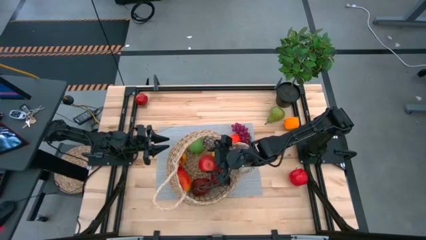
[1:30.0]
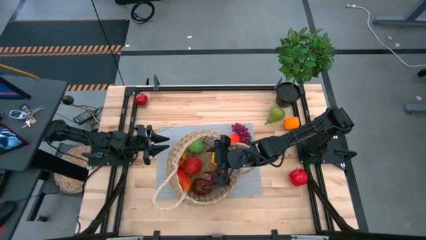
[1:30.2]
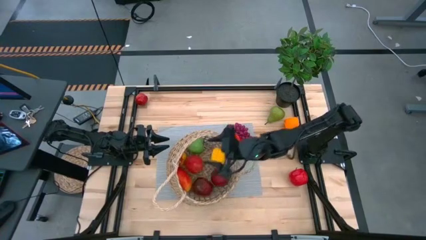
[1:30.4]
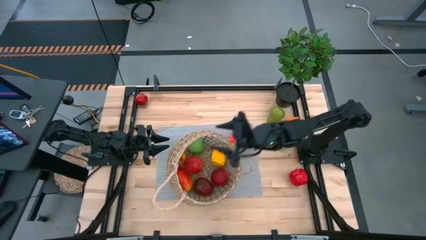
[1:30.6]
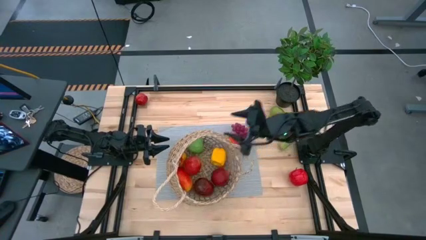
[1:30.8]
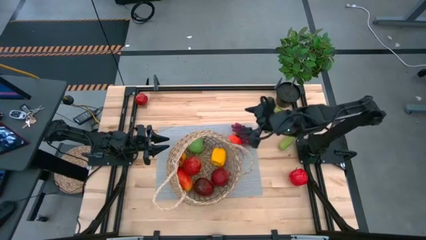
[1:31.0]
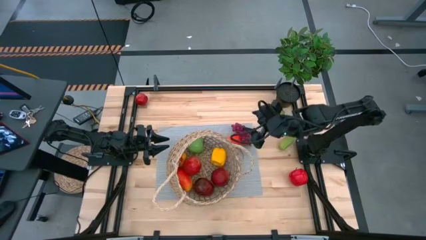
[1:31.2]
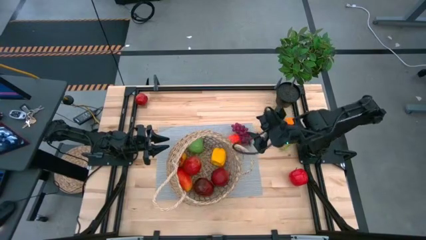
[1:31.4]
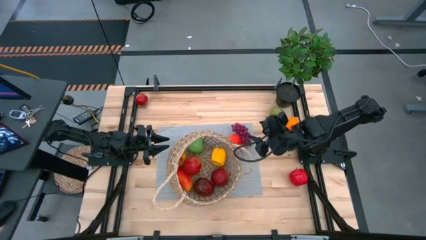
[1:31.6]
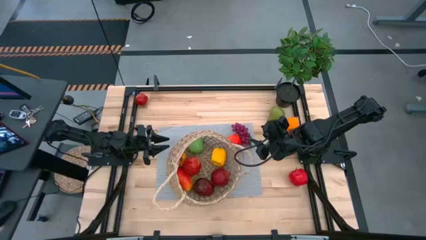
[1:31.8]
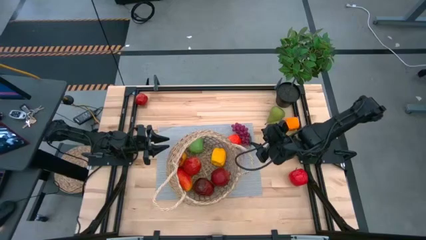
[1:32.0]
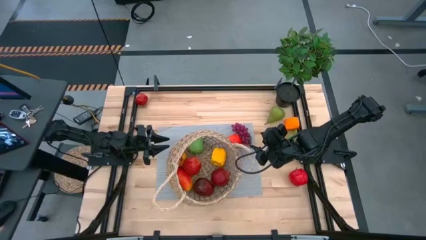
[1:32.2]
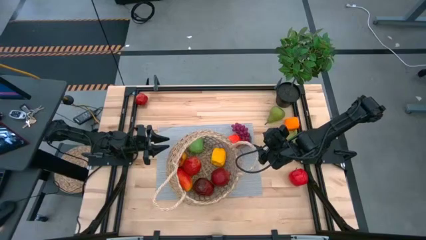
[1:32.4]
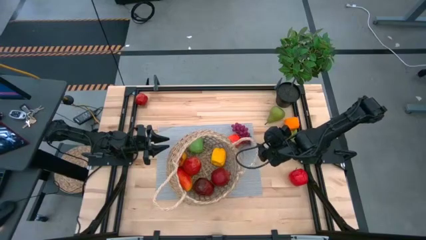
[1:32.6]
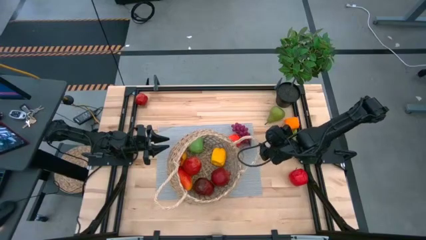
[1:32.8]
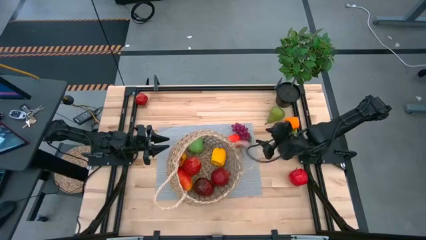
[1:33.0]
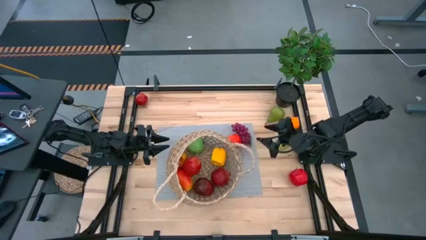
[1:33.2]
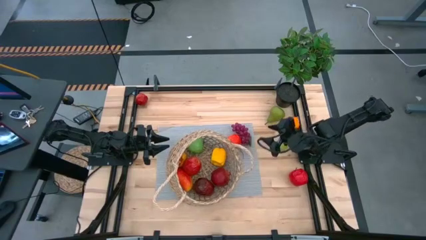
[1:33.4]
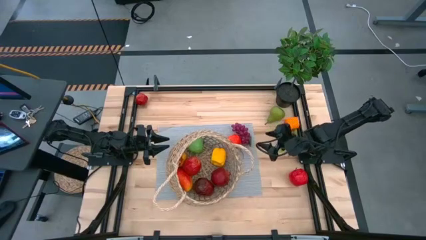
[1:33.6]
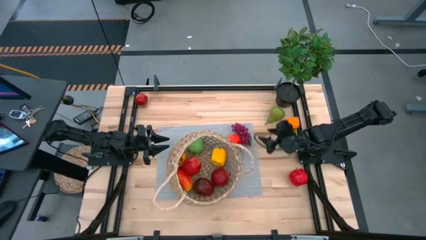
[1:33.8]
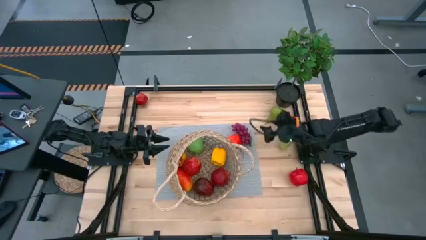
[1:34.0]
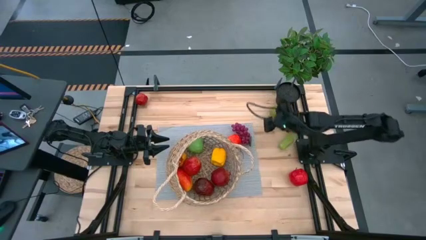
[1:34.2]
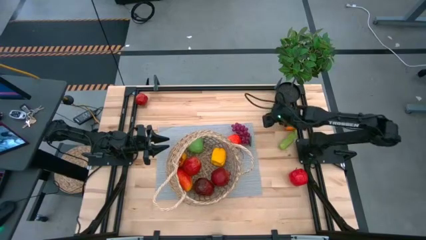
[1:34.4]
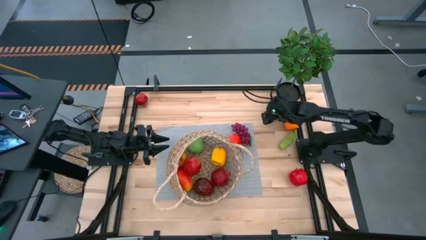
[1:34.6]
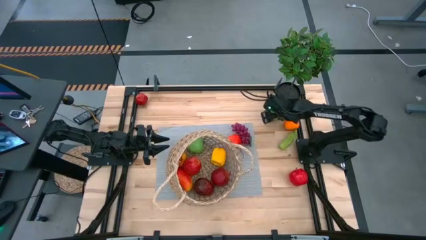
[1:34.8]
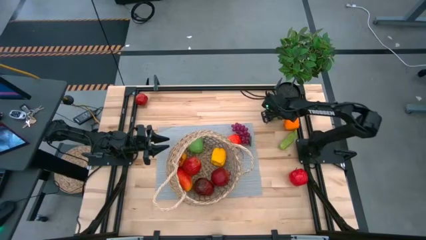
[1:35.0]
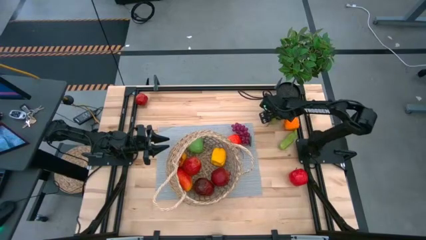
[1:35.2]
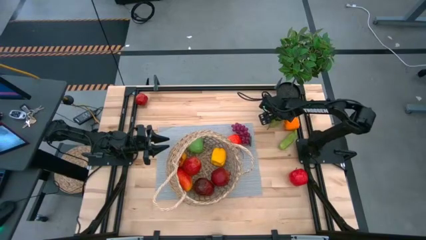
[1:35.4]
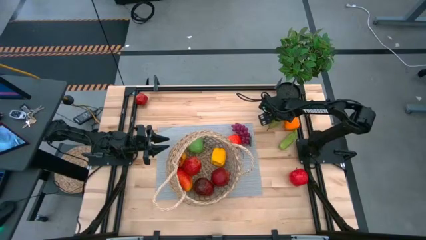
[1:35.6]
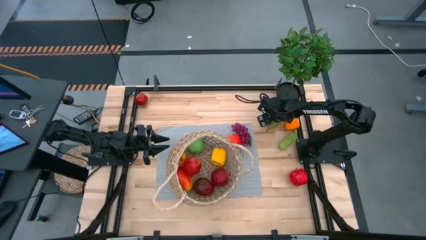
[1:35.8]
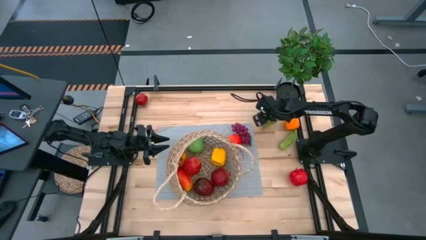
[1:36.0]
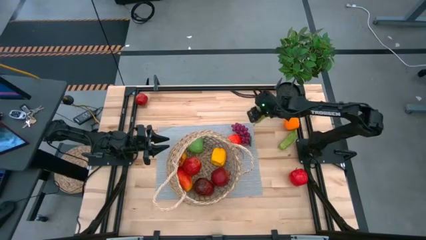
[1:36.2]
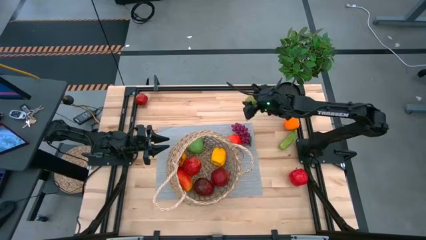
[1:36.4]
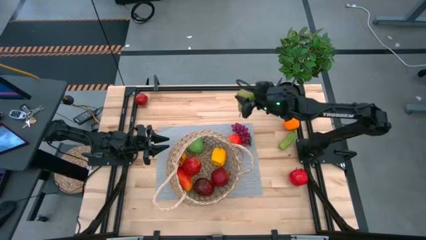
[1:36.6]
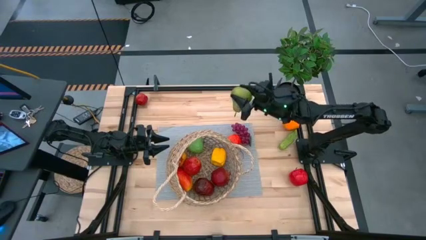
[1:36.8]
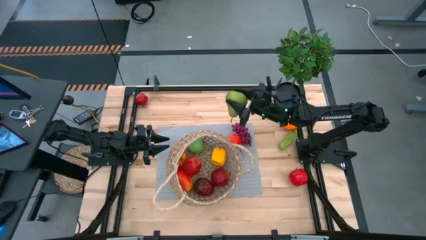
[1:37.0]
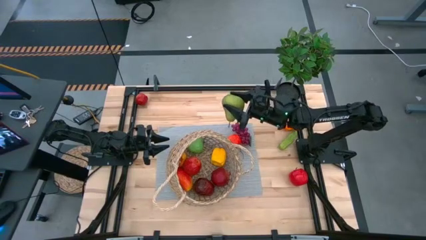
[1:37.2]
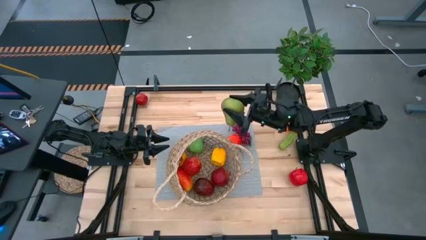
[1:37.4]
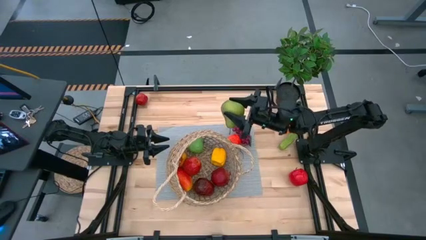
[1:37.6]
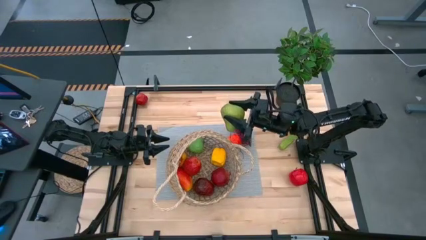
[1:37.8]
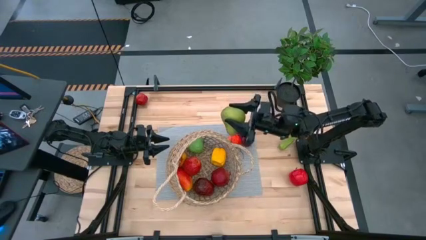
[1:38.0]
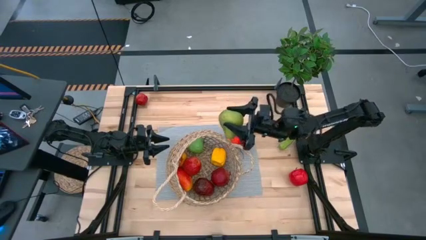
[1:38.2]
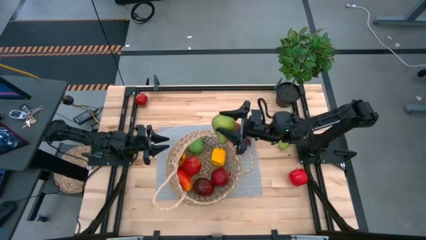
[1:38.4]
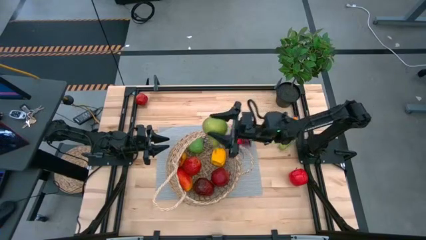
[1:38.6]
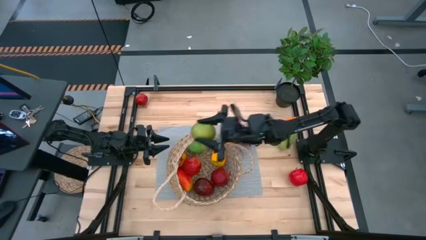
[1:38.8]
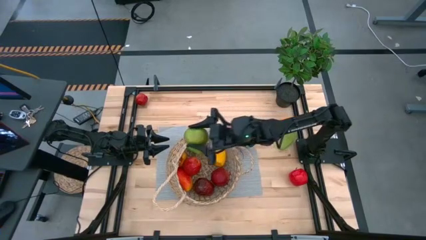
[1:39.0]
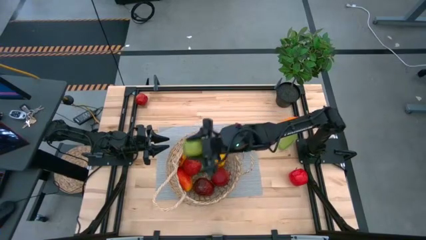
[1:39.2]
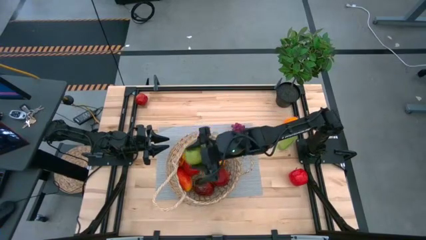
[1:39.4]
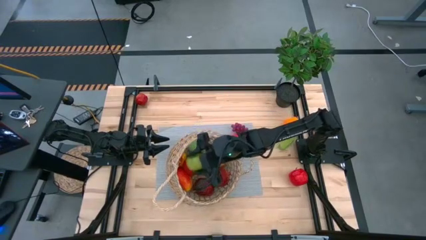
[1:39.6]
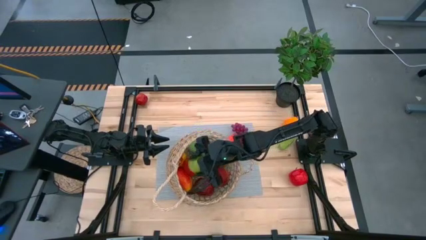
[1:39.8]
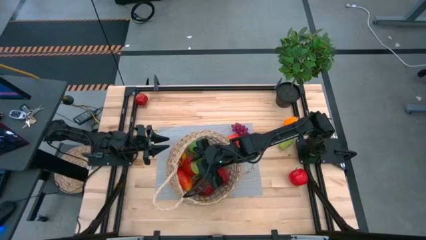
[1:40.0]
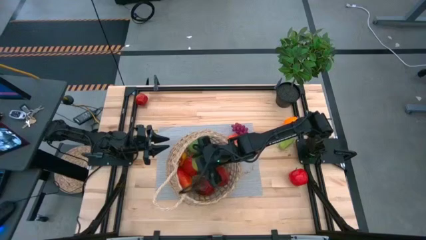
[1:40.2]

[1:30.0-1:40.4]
Task: Build produce basket
Put the green pear into the brown basket

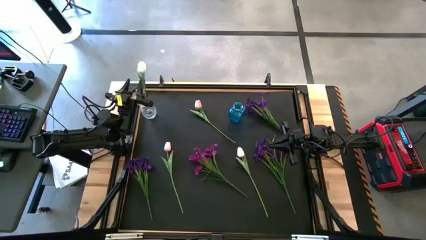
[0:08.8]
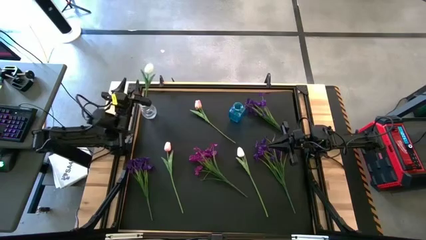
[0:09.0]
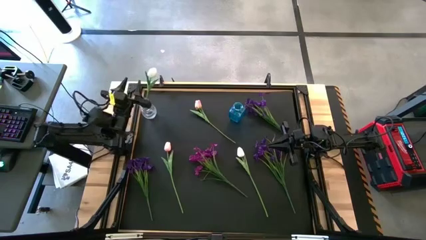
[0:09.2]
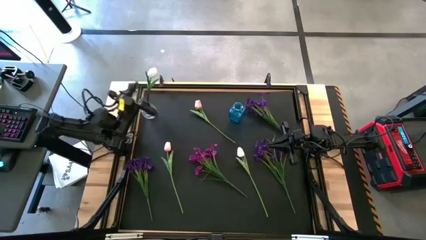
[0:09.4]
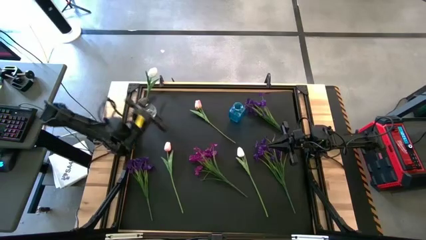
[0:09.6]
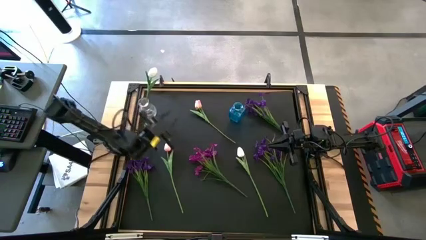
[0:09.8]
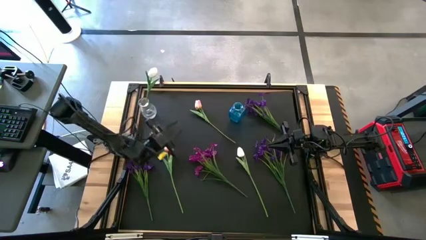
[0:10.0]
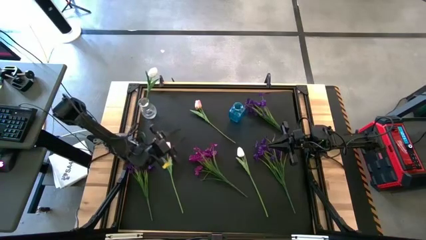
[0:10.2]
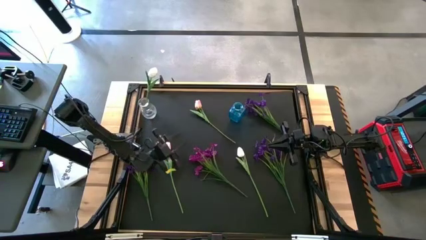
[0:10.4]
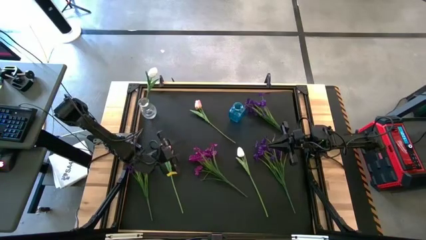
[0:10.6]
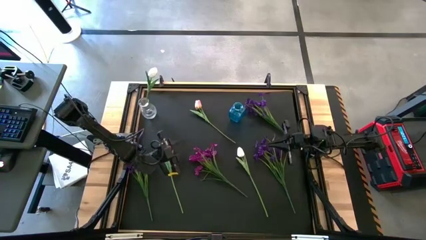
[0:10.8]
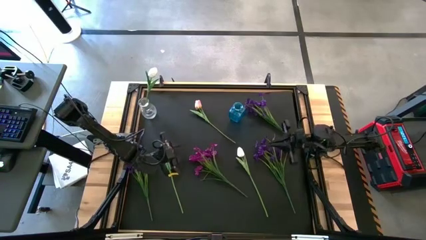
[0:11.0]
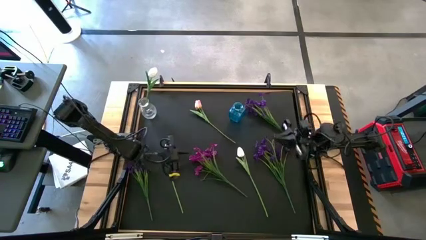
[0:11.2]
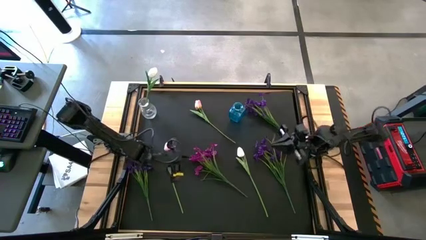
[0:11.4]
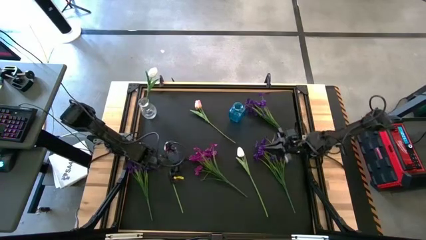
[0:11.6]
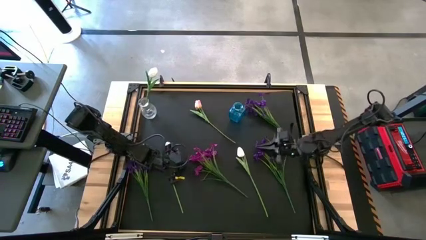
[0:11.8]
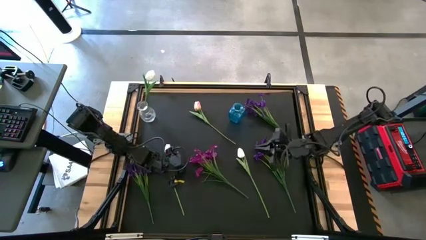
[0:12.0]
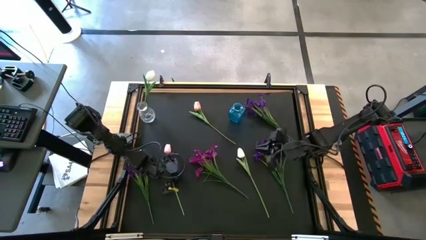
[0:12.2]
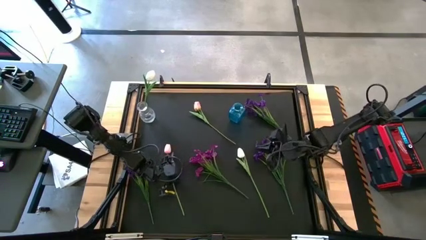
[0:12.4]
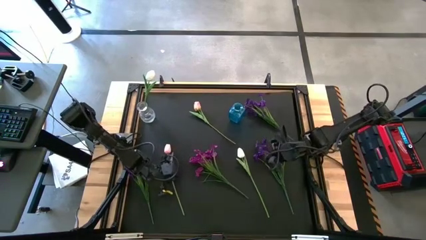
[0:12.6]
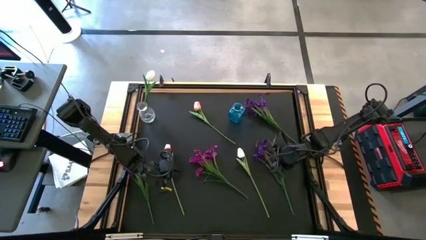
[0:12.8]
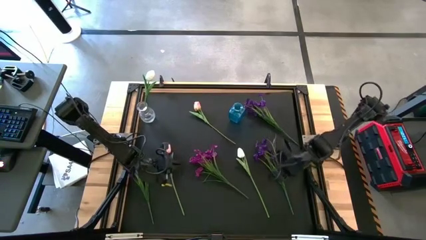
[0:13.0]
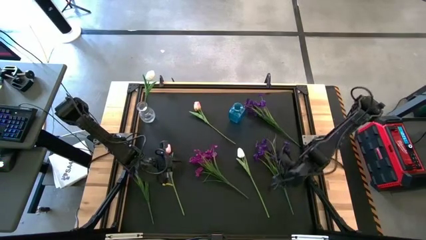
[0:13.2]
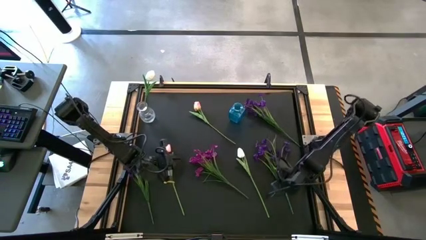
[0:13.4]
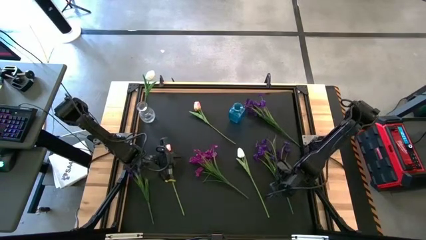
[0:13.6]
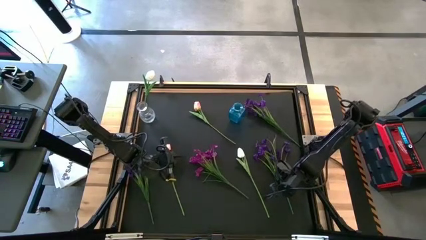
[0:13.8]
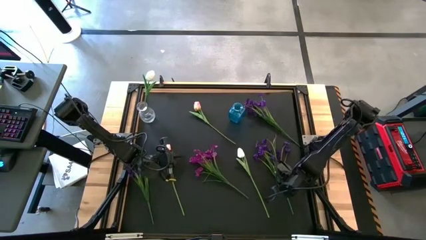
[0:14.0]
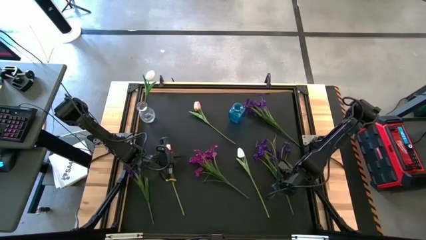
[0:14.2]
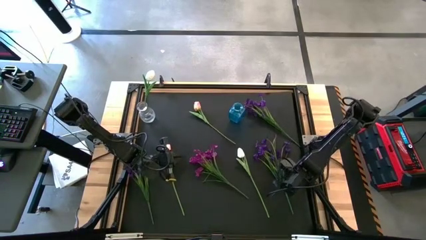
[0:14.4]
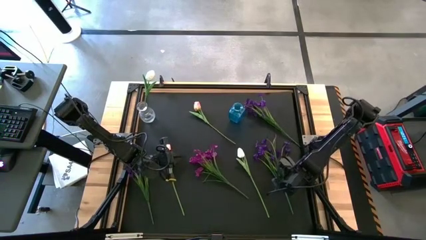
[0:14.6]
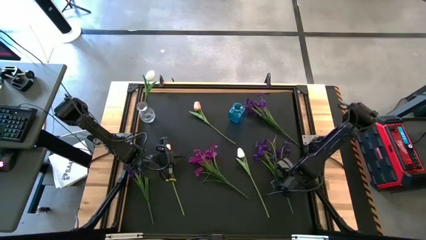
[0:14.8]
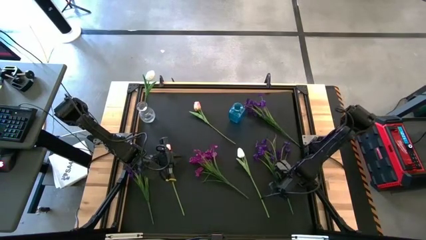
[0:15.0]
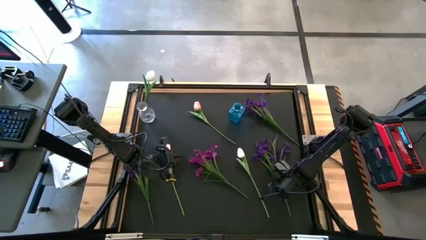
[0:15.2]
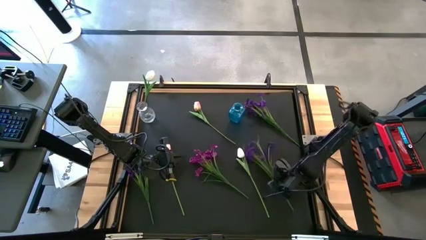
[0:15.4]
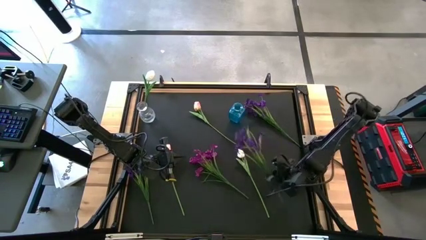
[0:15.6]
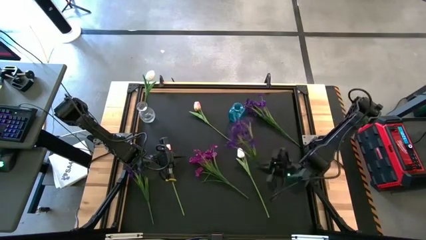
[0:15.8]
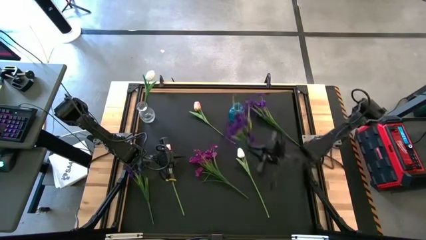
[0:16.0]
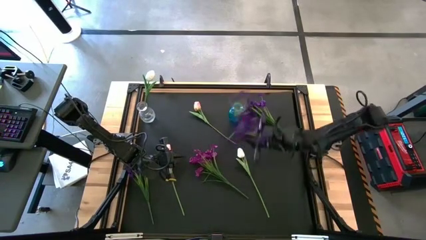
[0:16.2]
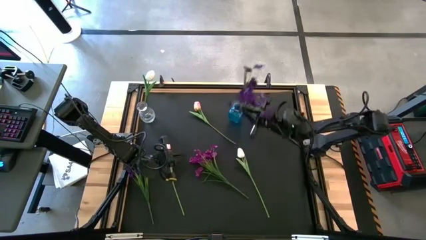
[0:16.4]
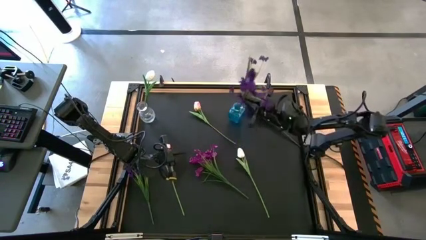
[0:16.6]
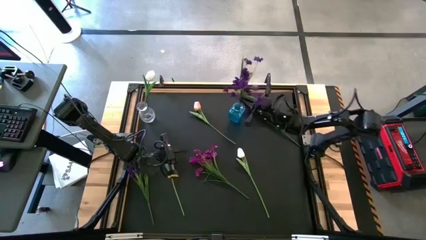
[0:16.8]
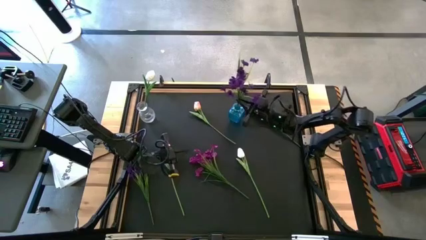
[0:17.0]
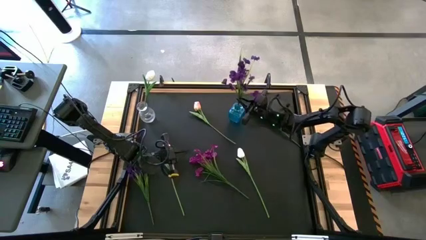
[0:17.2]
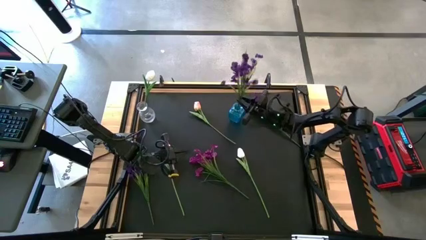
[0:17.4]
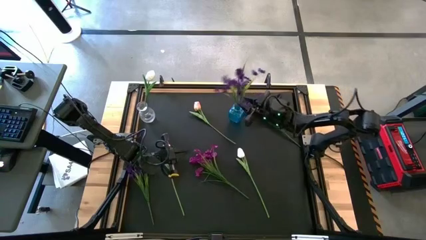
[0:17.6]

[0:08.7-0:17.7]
Task: Sort flowers into vase by color
Put the bottom right violet flowers into the blue vase
